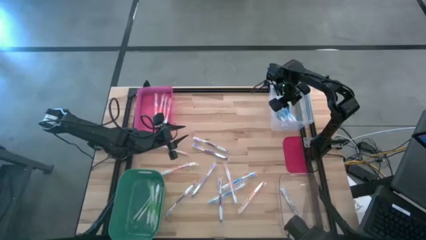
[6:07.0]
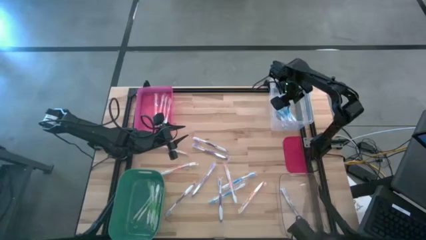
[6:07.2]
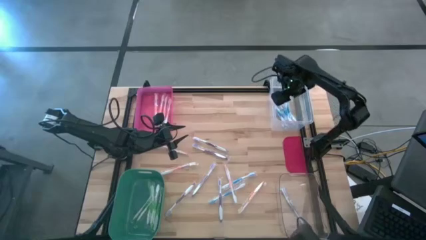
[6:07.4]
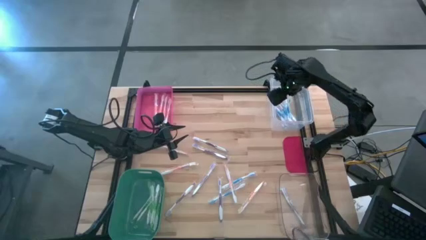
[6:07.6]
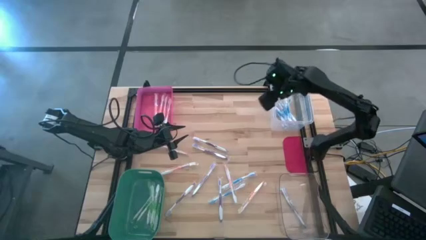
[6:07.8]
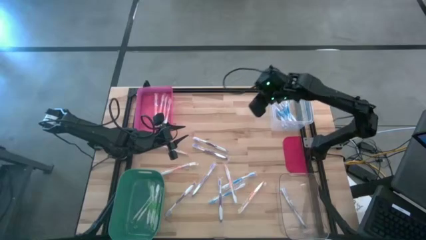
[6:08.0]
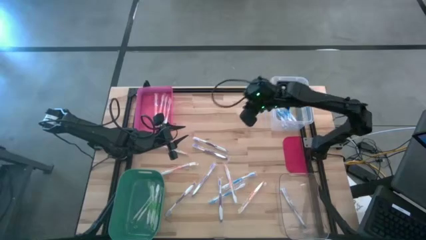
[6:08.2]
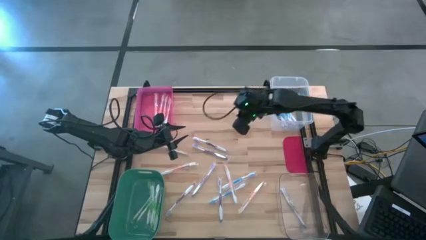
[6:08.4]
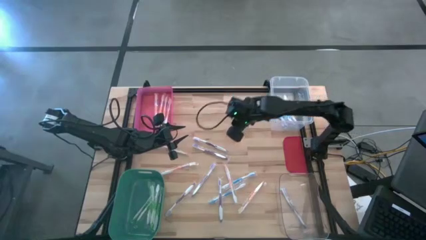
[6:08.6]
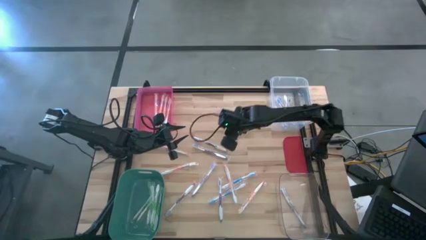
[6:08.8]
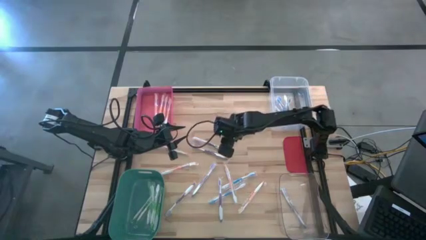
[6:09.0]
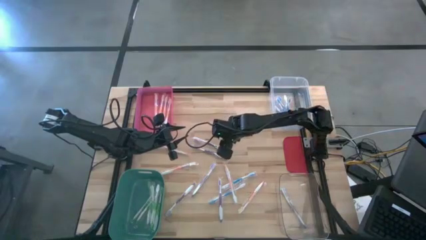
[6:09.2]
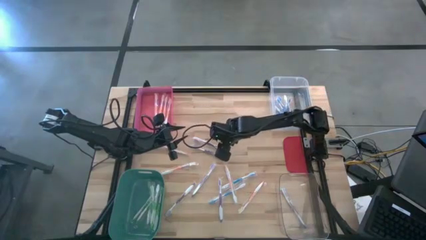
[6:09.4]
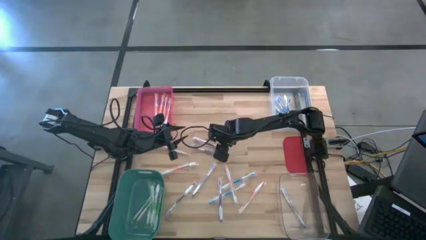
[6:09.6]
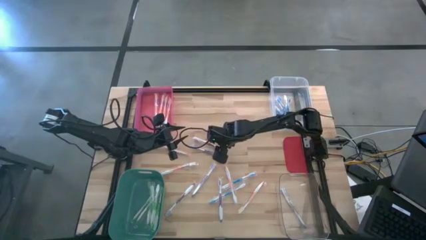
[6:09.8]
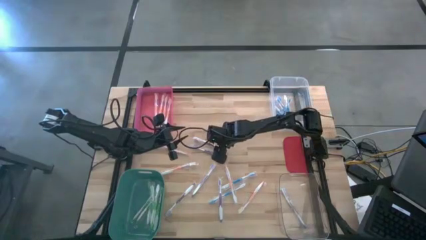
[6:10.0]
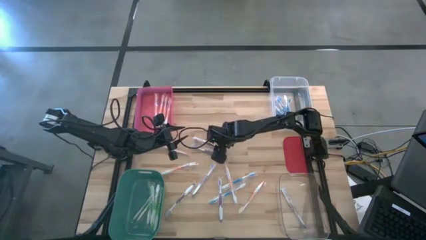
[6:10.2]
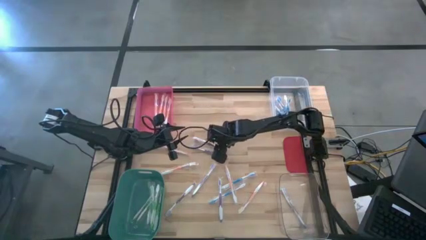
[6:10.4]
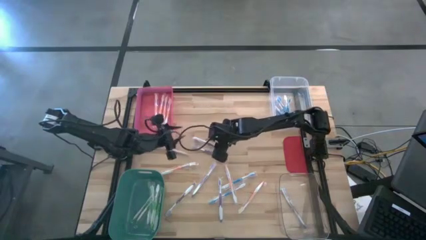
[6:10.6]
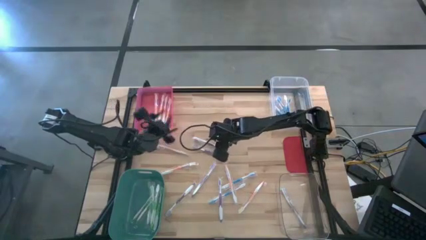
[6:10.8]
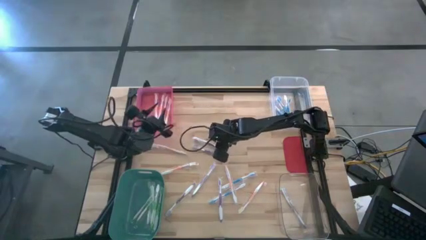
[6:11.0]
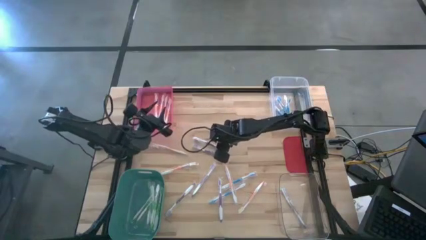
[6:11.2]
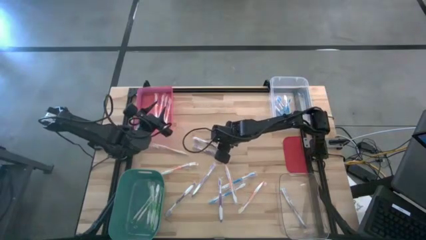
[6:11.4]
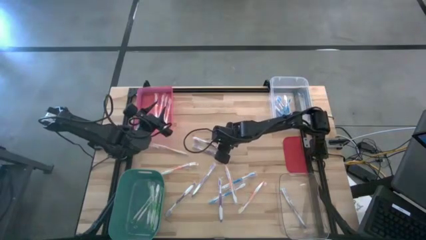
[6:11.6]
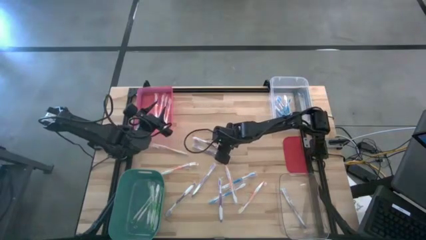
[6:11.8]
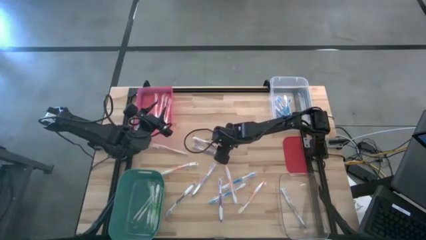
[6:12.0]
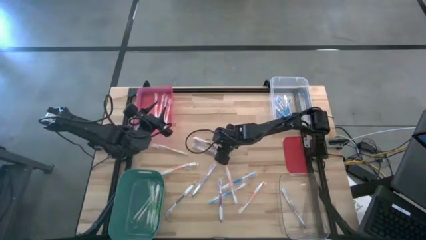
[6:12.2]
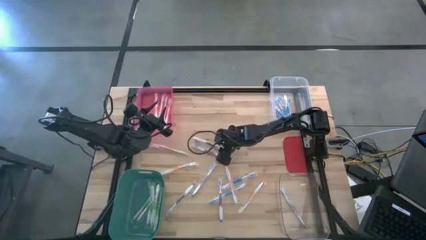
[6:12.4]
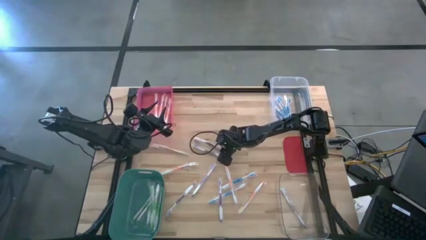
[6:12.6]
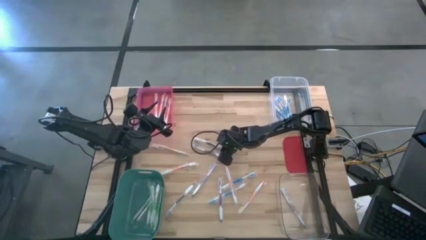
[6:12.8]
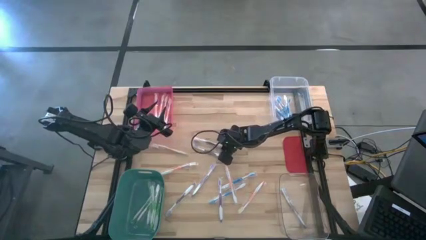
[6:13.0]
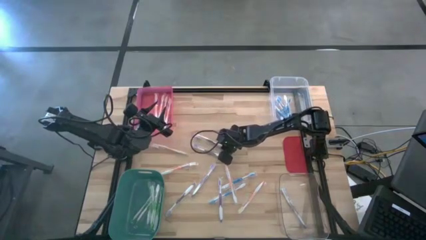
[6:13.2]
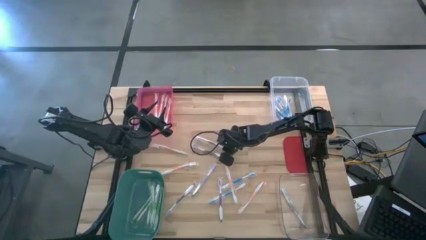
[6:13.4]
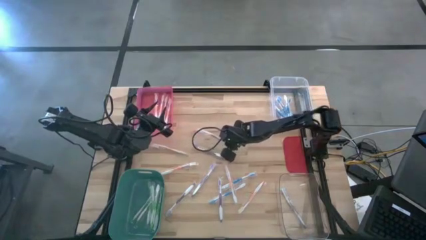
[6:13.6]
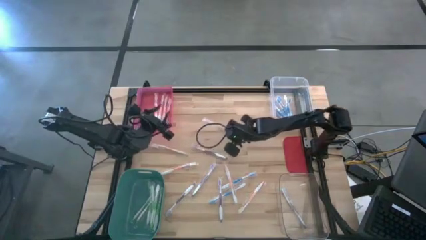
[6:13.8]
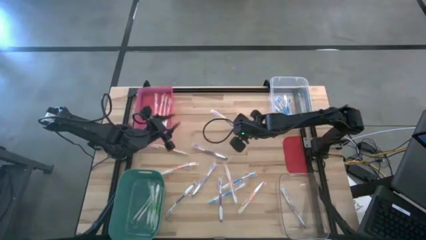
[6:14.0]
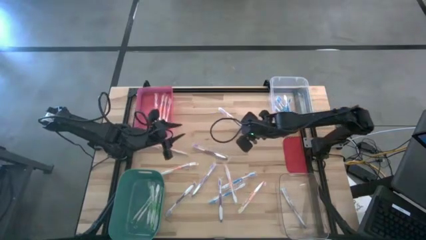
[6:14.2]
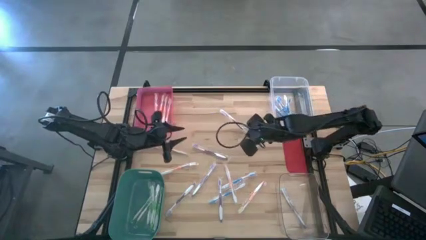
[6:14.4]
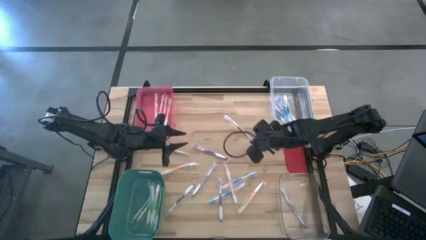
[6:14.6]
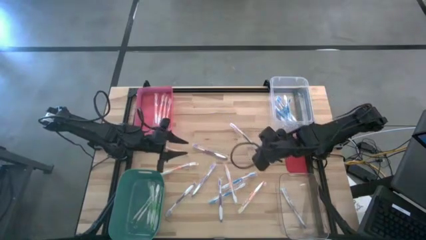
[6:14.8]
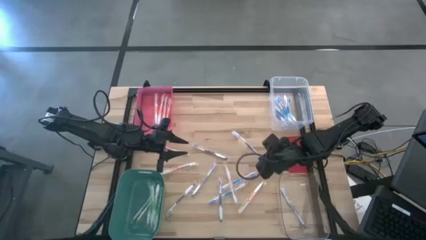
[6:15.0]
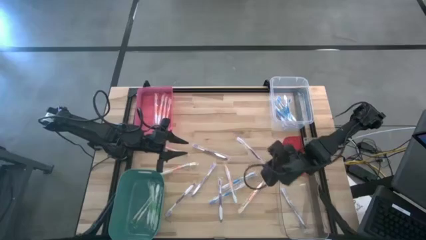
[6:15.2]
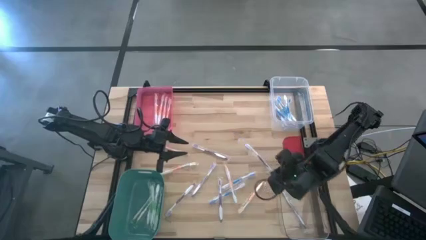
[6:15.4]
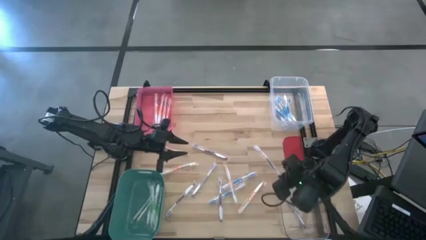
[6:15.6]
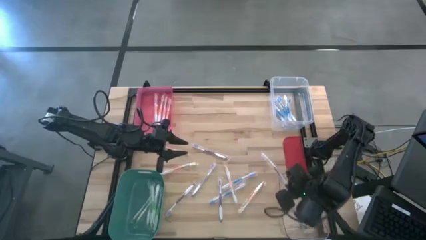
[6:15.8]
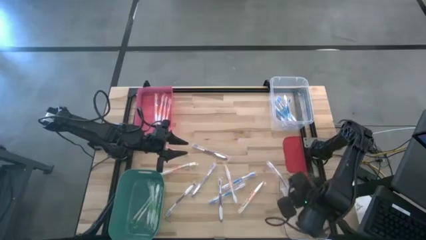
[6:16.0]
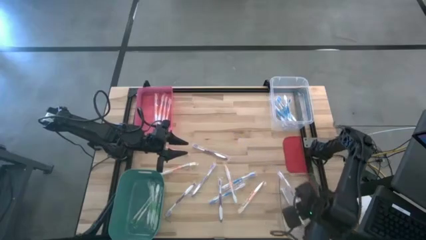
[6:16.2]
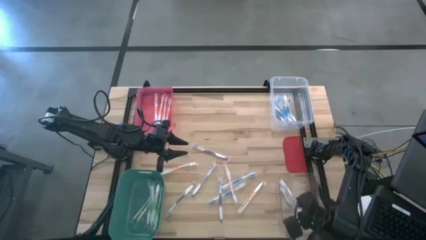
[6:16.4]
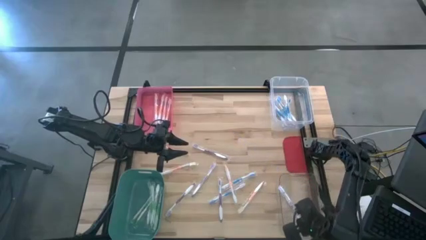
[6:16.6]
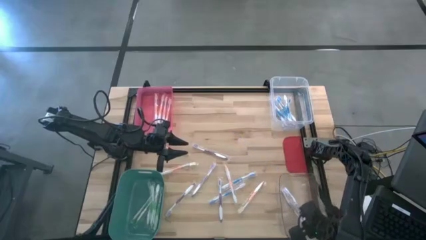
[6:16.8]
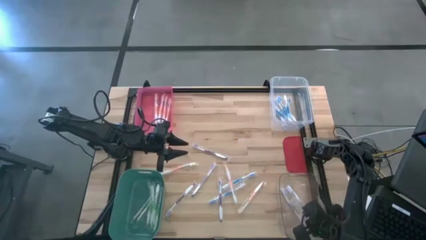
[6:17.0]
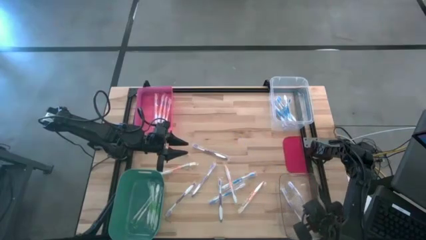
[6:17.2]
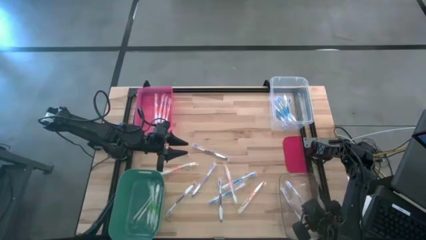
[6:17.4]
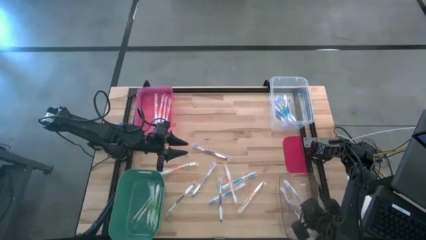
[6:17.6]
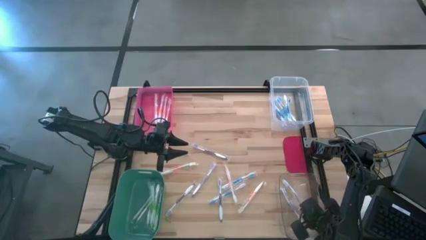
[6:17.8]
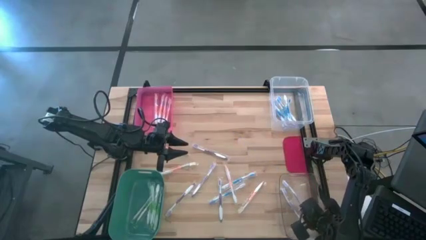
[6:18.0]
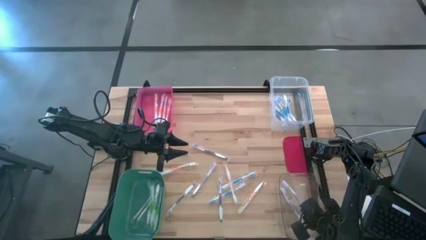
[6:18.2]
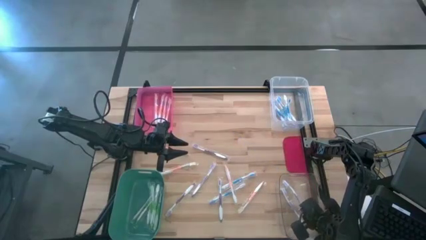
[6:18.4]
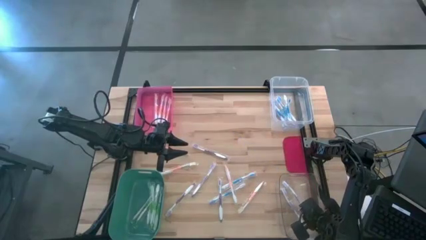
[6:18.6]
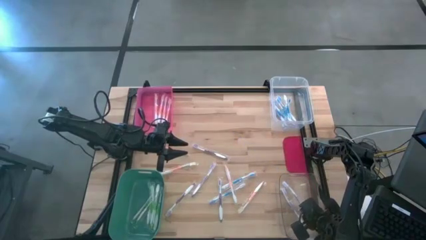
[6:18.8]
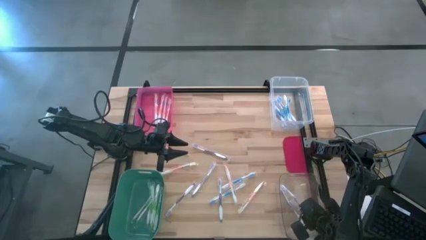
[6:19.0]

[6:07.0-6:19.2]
Task: Pick & Place Toothbrushes
Put the violet toothbrush into the bottom transparent bin

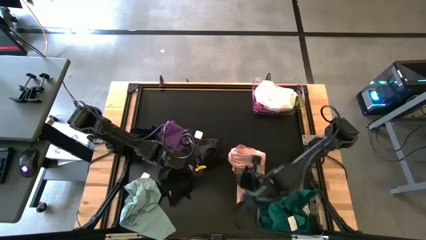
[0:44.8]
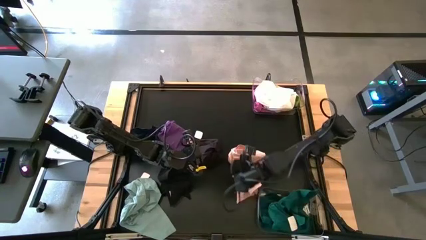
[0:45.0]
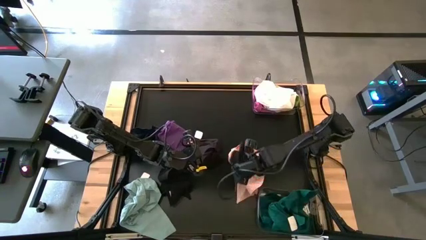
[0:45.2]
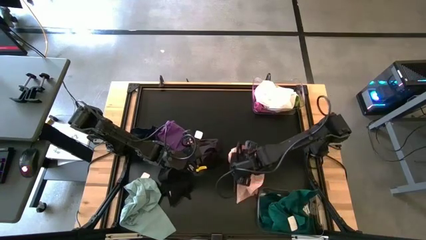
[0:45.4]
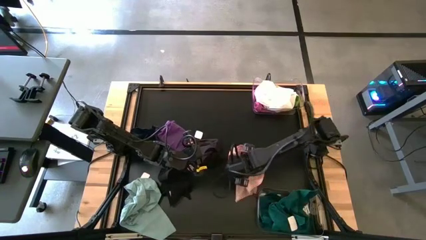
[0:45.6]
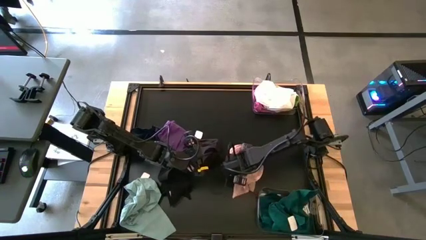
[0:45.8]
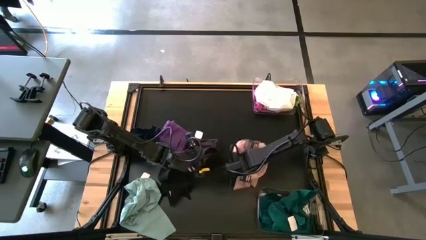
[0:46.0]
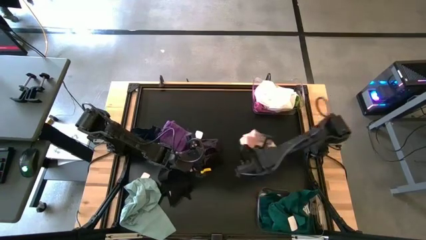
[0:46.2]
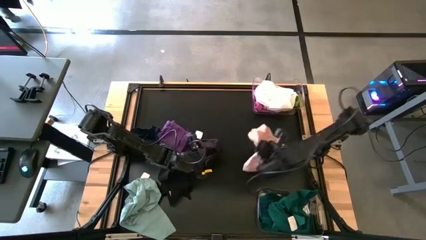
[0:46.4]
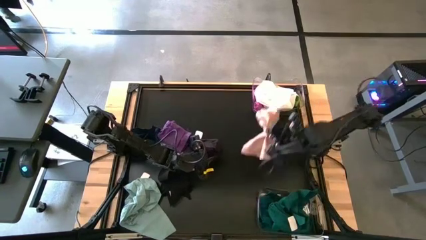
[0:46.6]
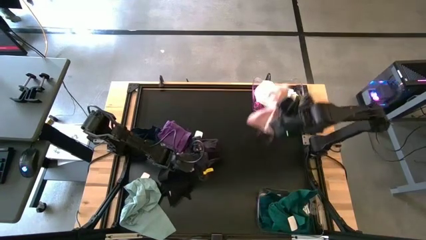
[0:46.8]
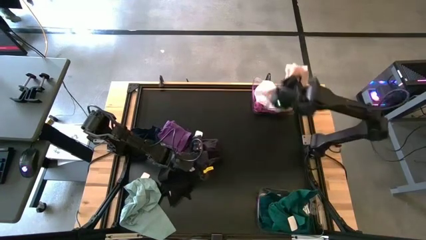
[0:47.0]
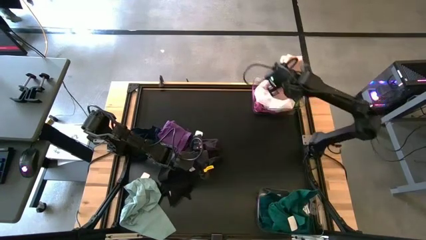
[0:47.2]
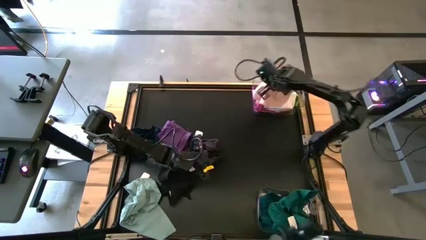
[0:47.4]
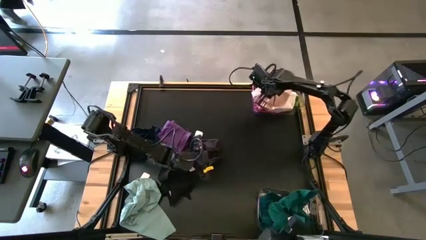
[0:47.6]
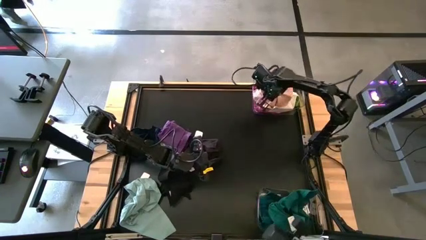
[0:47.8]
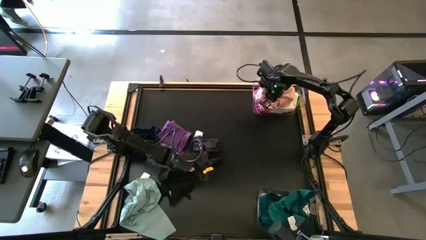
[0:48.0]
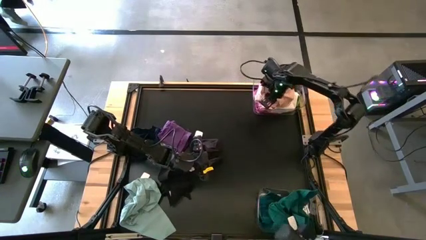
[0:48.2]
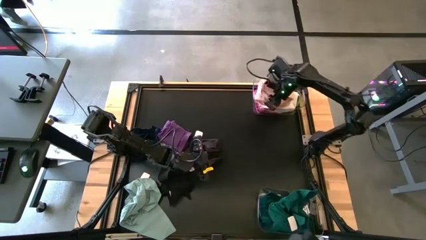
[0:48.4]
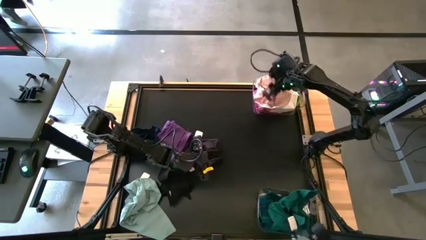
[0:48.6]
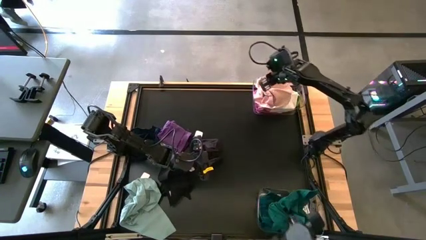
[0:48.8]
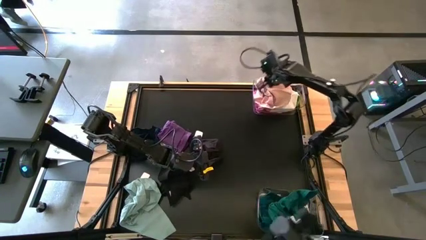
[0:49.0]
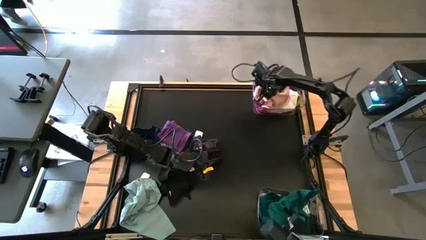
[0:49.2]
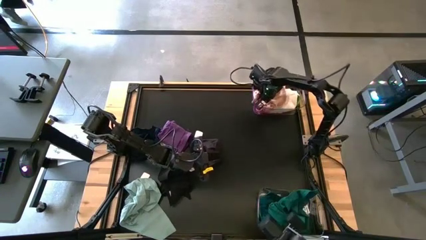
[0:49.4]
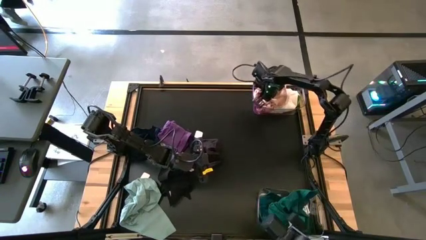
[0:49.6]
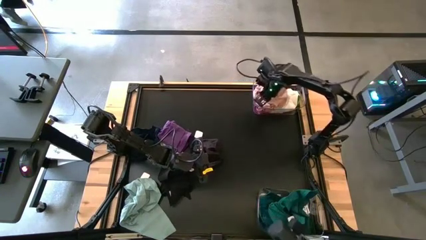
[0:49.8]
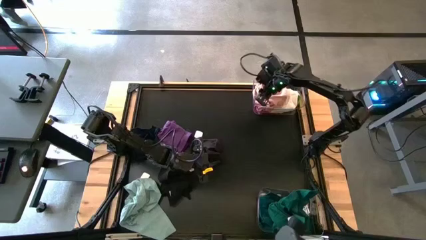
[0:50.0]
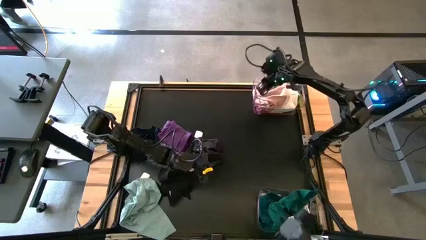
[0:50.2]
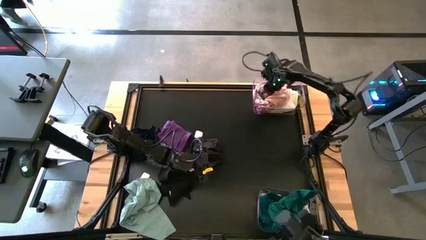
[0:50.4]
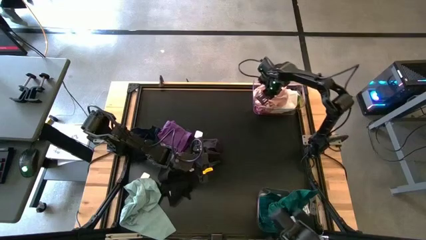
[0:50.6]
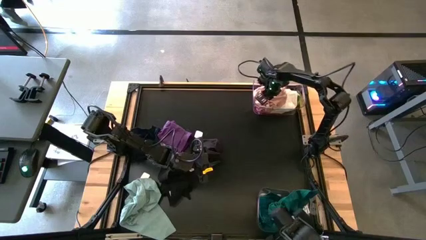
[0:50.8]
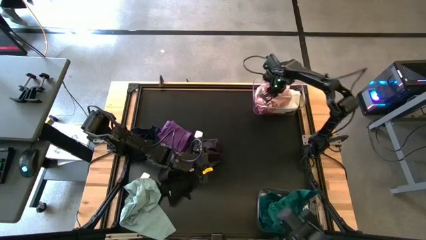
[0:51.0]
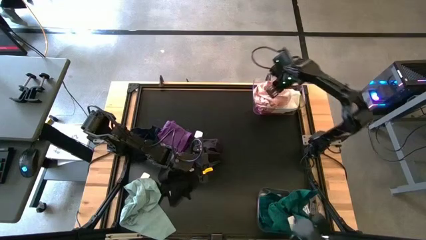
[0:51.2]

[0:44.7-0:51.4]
Task: Sort towels by color in basket
Put the light pink towel into the top transparent bin
